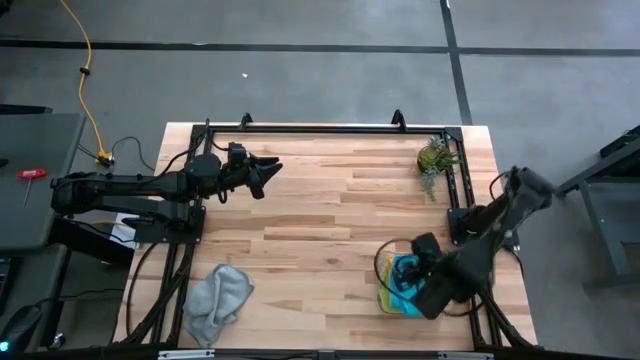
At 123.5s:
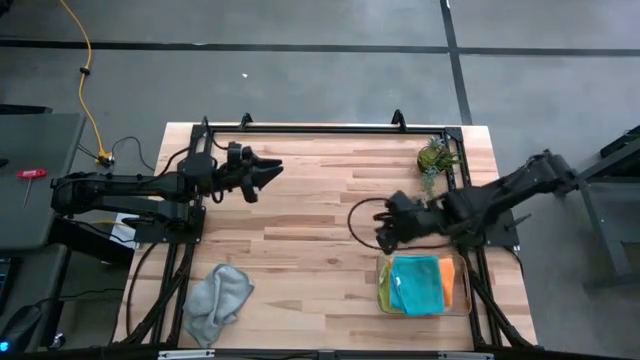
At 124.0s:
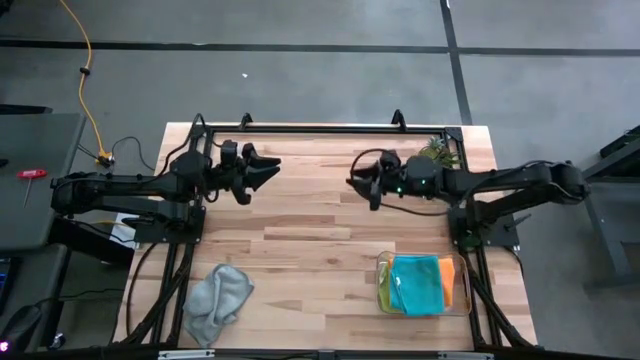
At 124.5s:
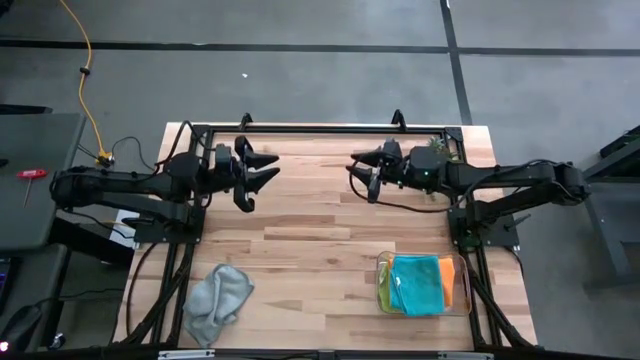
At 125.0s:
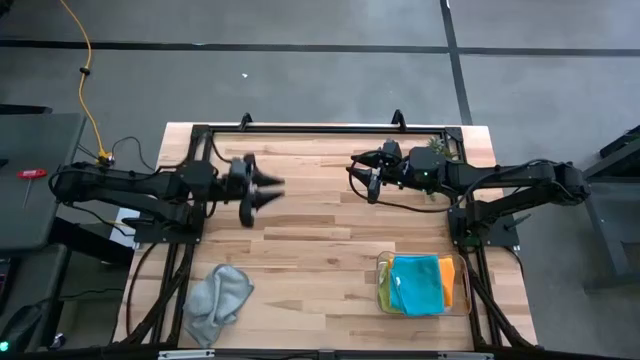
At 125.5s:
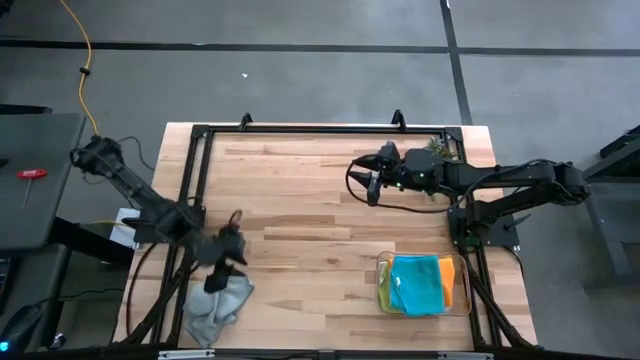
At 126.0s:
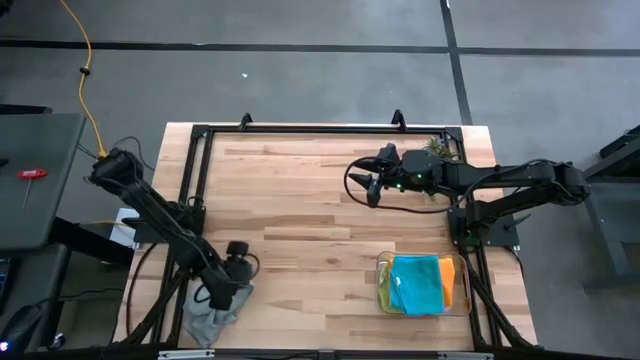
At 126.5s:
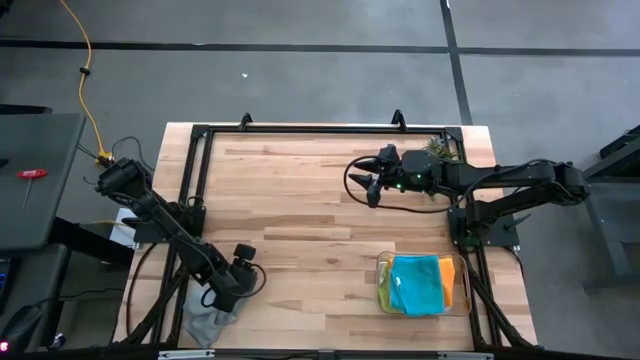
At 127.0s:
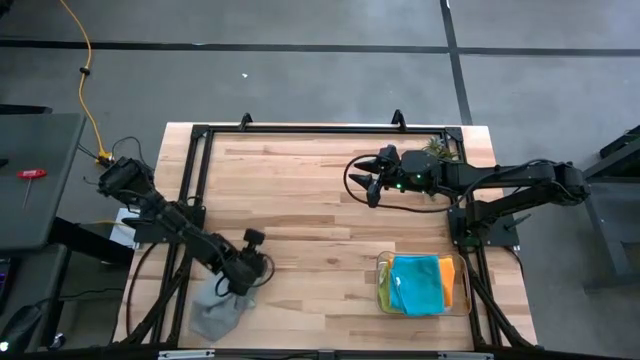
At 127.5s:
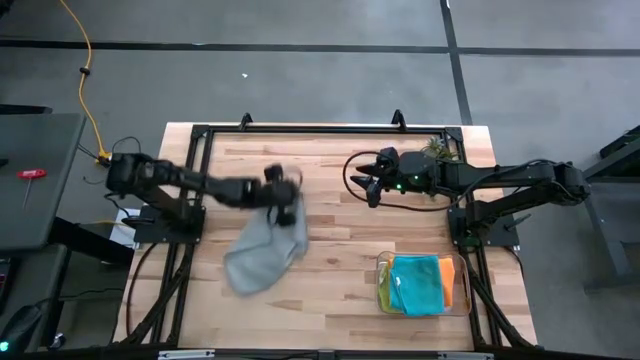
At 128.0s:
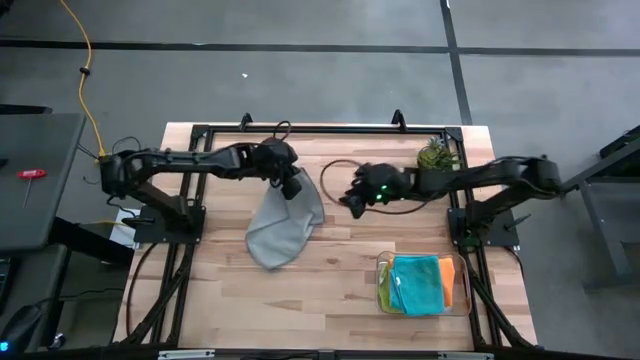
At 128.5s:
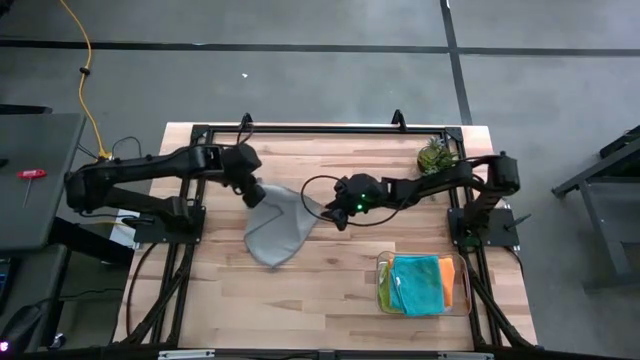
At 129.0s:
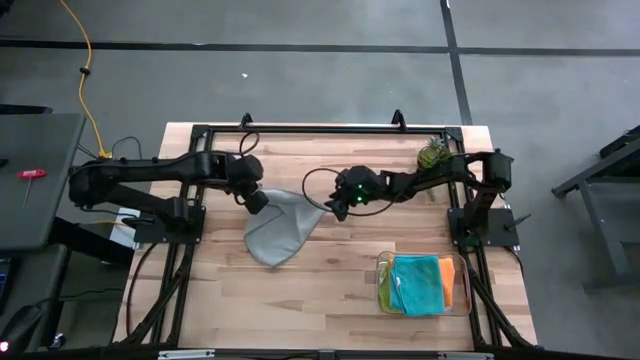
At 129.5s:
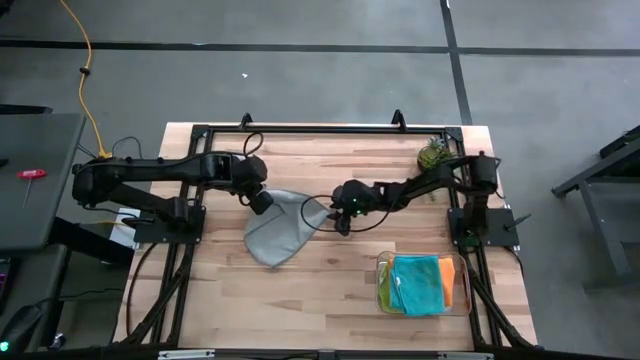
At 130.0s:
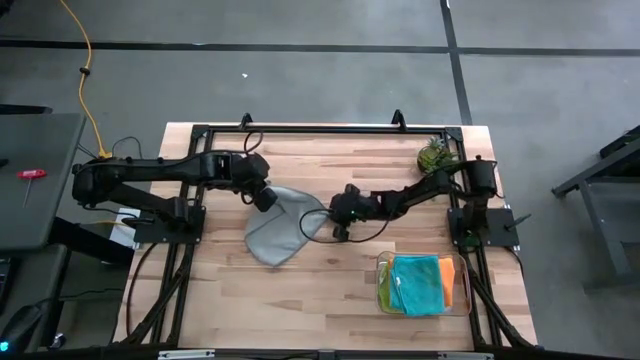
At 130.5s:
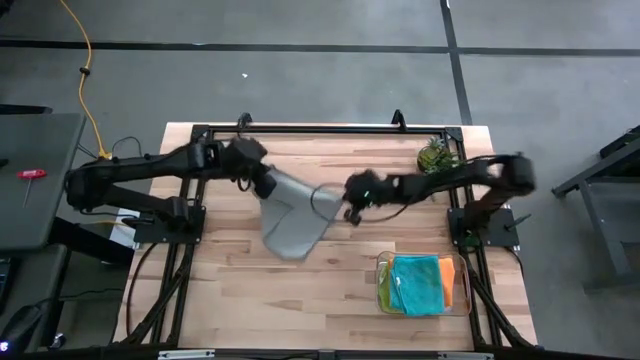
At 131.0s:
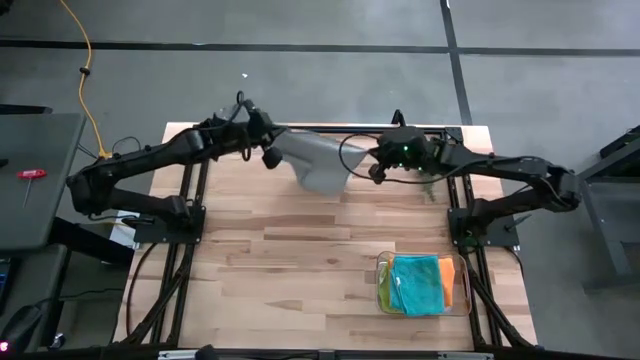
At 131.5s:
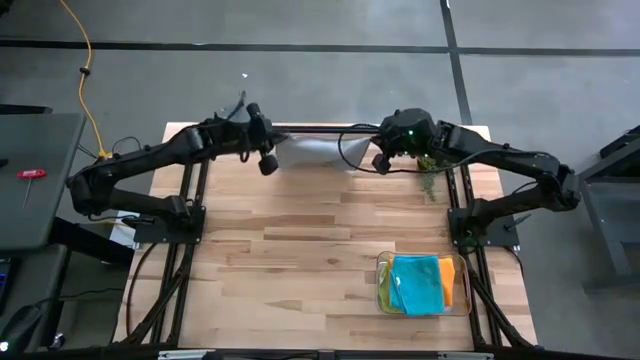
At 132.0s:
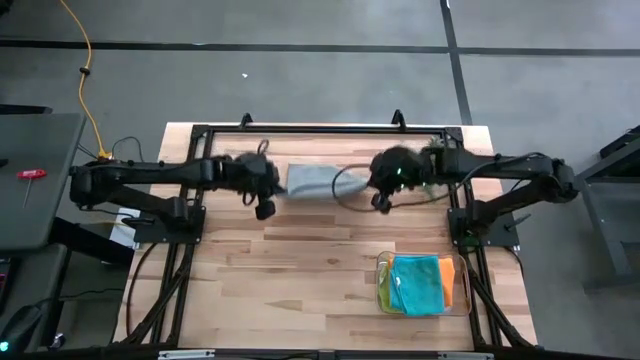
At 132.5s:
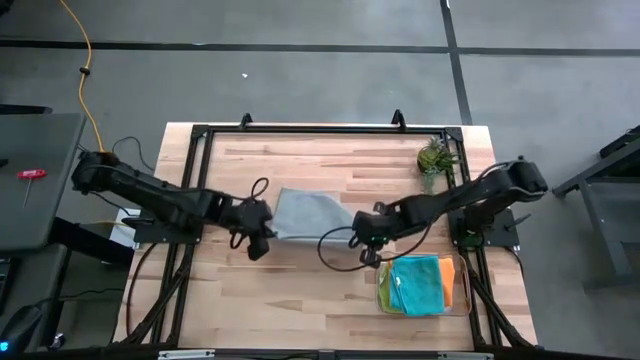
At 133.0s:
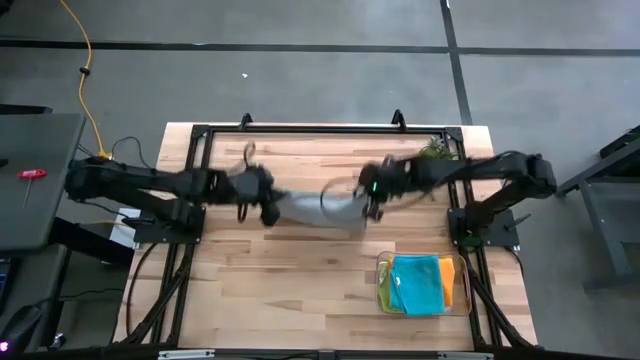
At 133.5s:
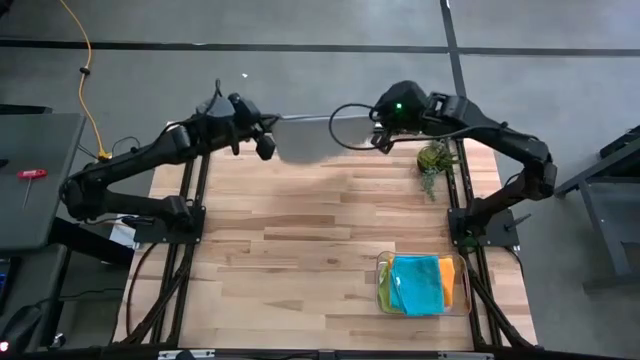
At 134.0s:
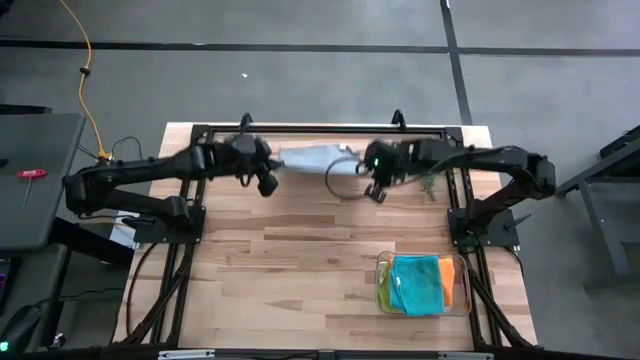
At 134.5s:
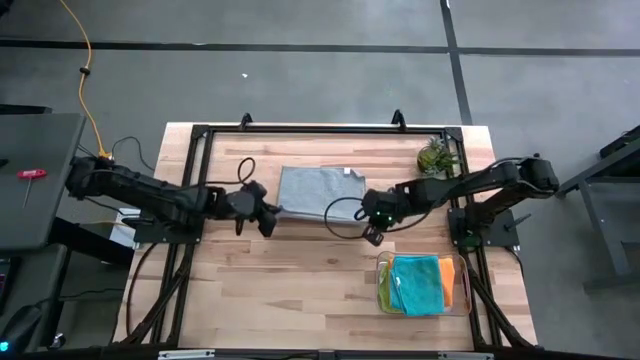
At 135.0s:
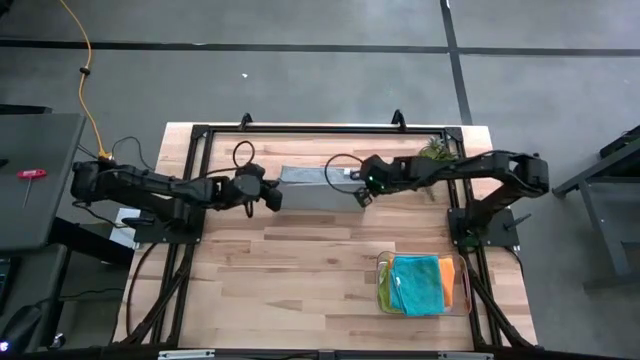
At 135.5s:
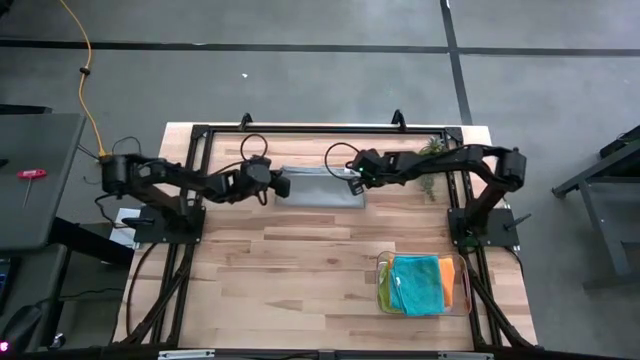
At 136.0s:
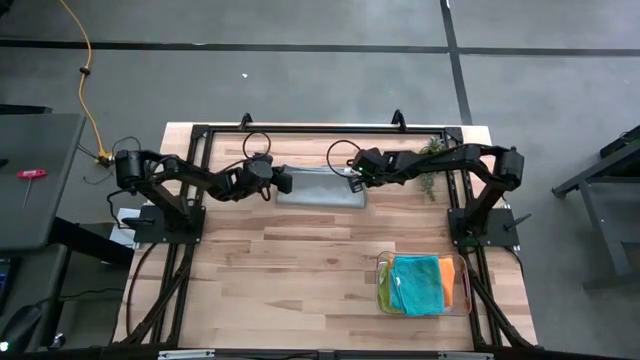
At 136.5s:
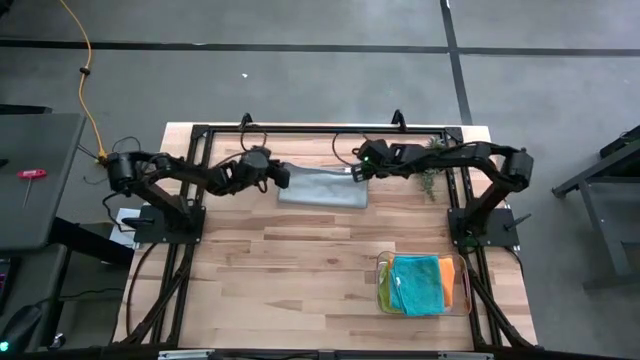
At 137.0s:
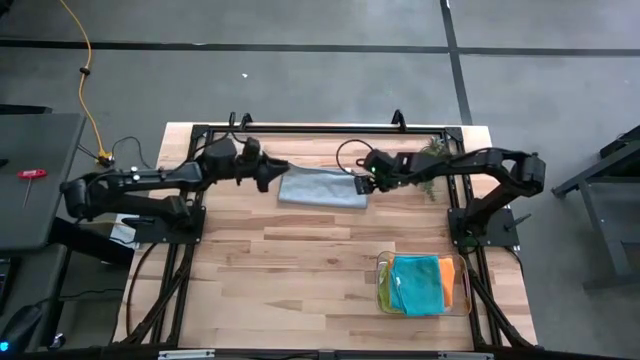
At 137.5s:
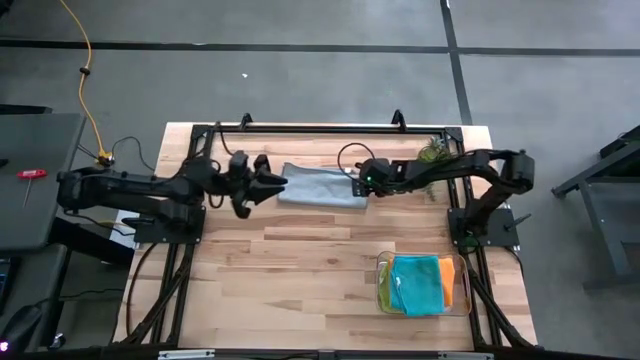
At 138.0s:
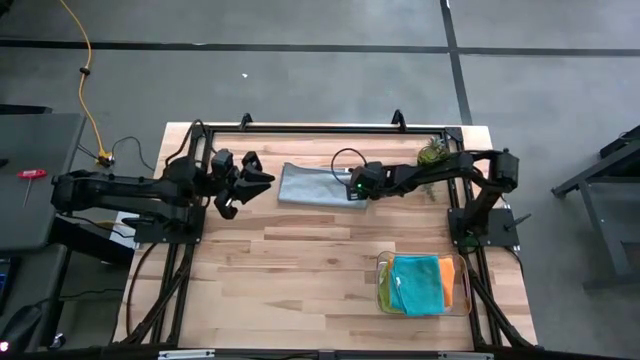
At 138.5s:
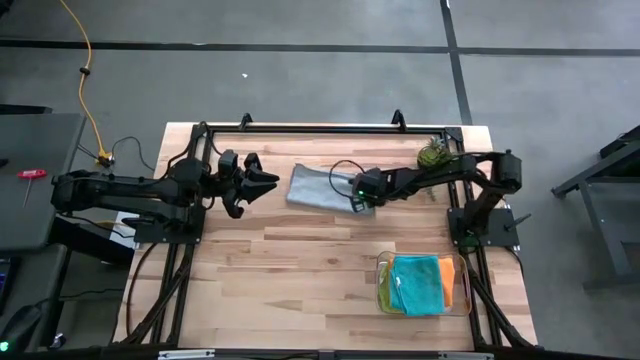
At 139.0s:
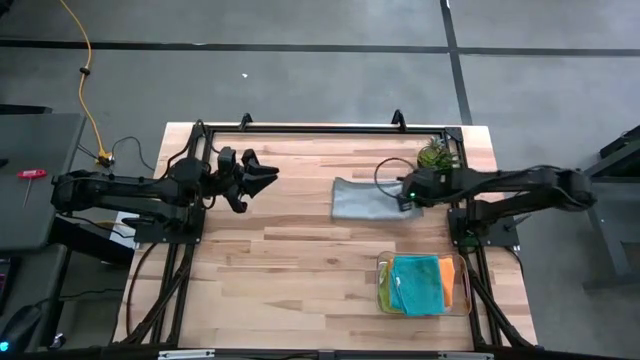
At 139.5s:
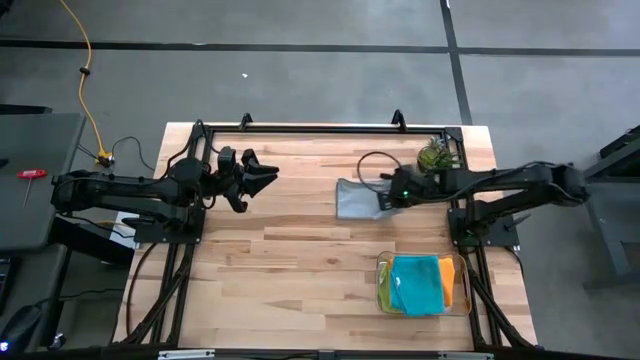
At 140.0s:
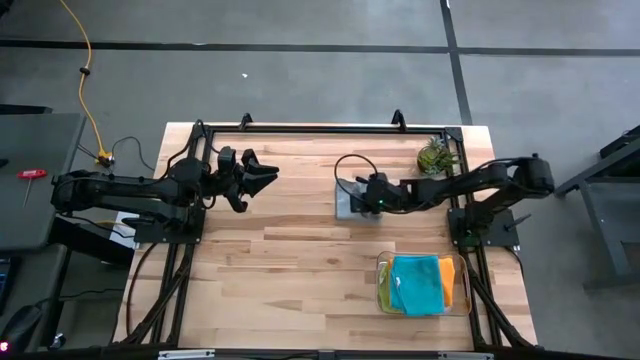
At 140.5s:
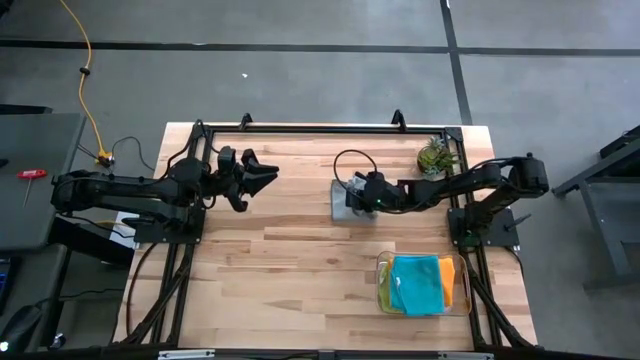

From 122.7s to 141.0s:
Task: Fold microfiber towels
Fold the gray microfiber cloth

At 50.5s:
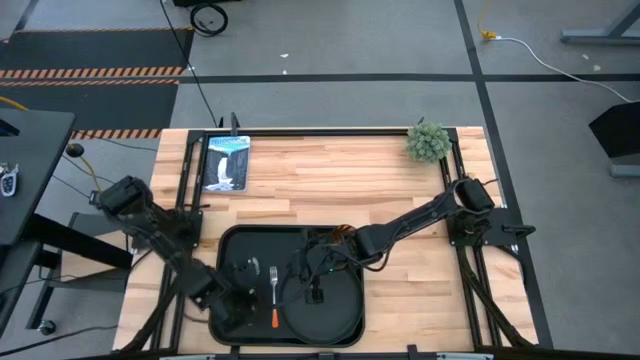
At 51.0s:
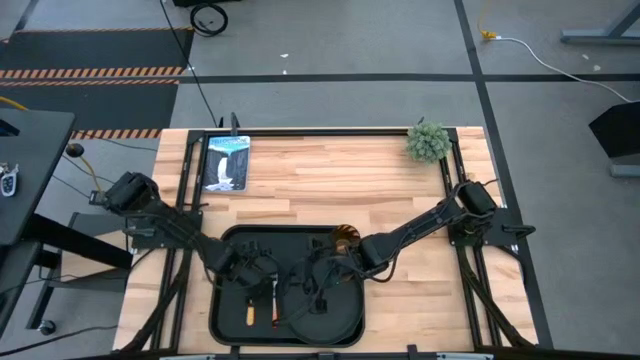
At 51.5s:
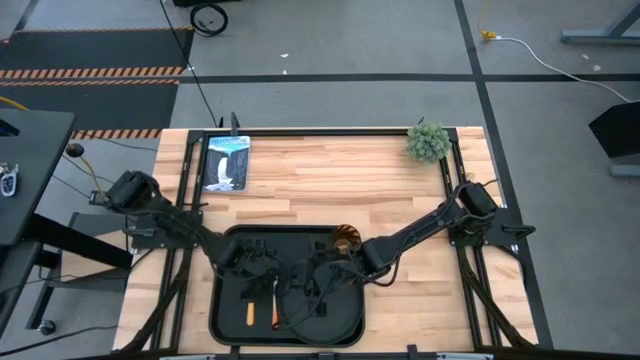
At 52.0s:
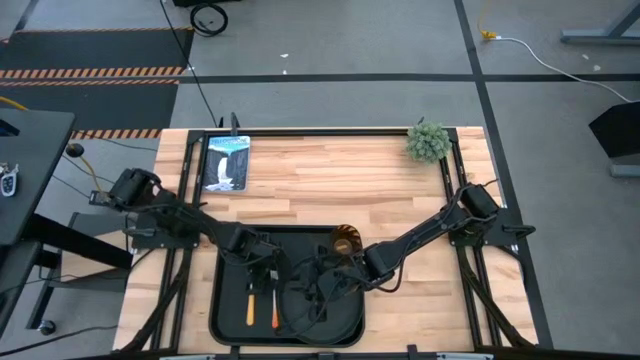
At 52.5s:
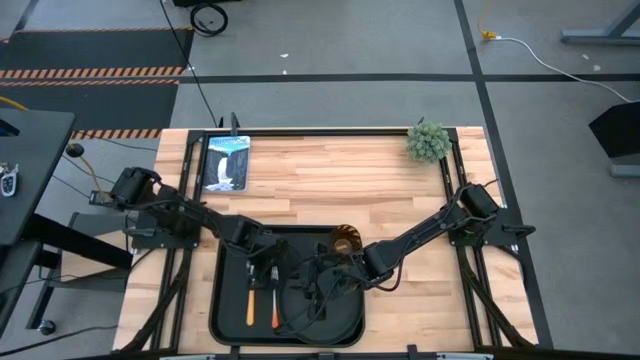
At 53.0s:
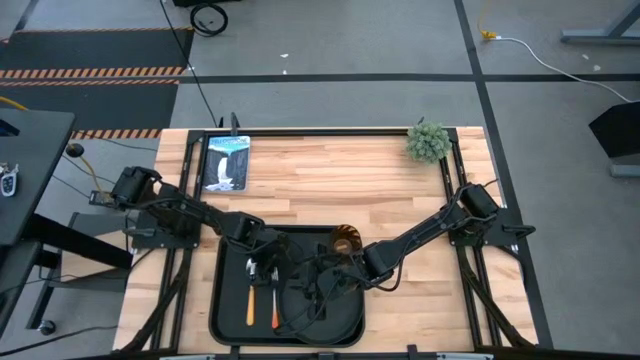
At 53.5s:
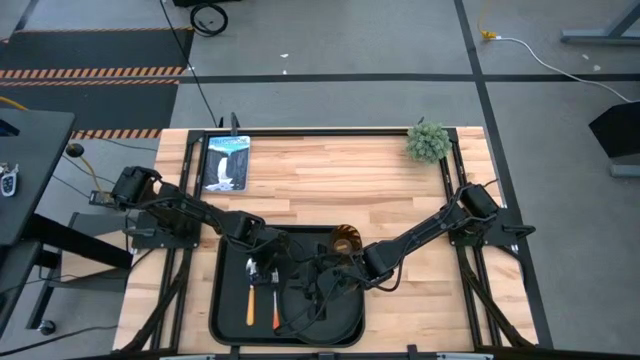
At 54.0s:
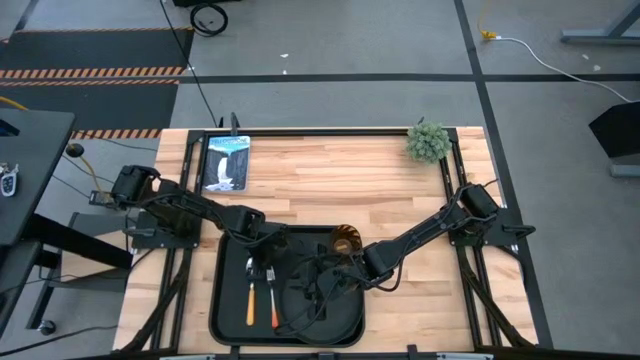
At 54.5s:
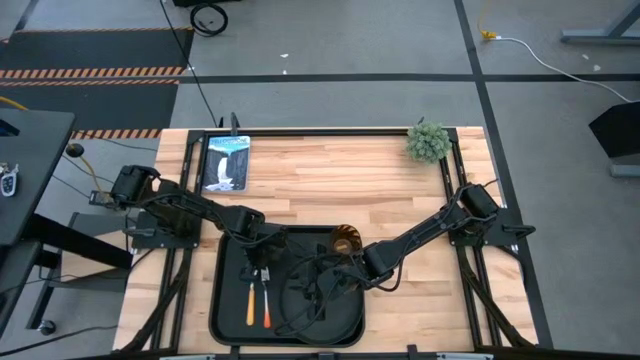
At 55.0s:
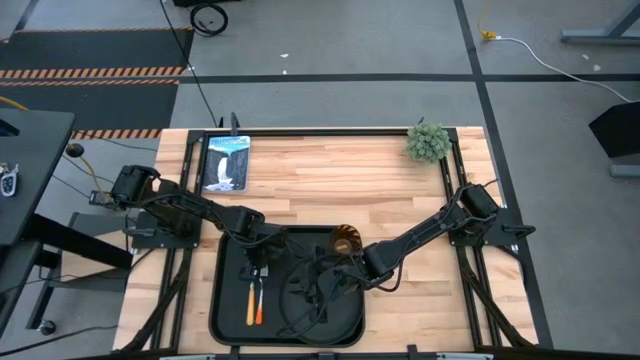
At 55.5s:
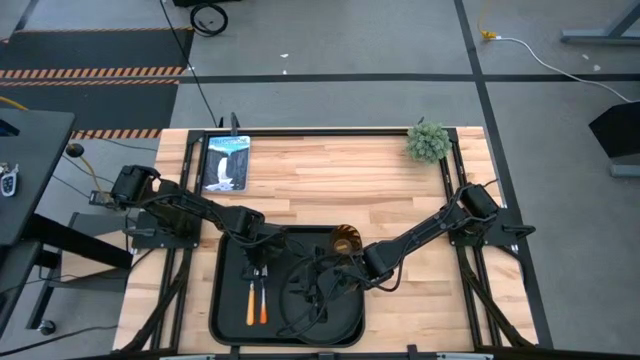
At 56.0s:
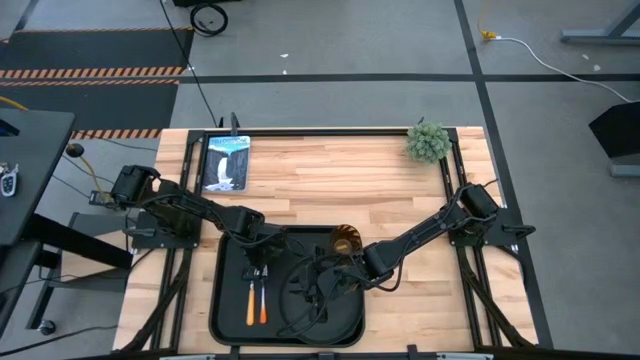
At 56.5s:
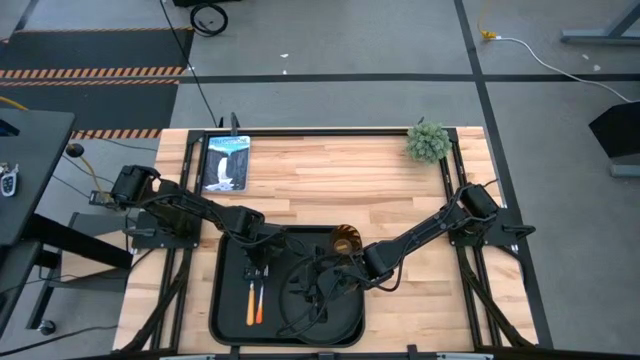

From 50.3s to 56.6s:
Task: Pick and place plate/cup/fork/spoon on tray
Adjust the orange fork on the black tray
